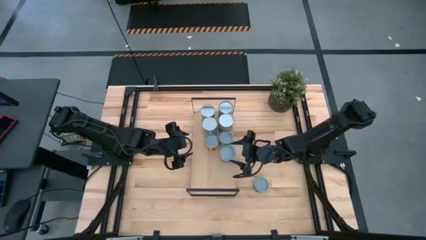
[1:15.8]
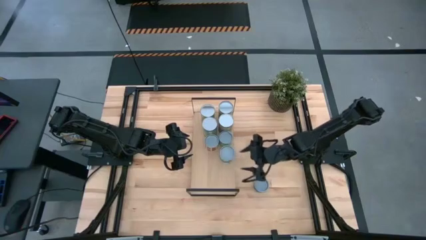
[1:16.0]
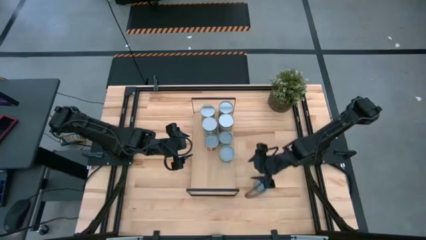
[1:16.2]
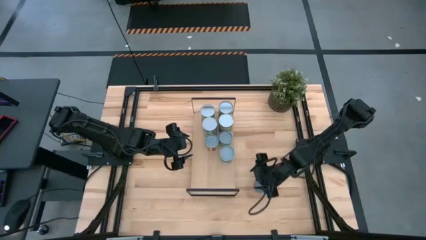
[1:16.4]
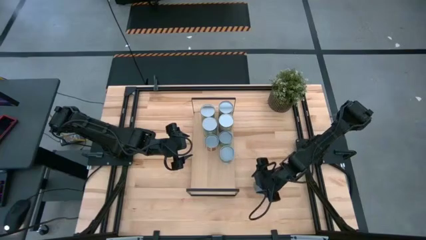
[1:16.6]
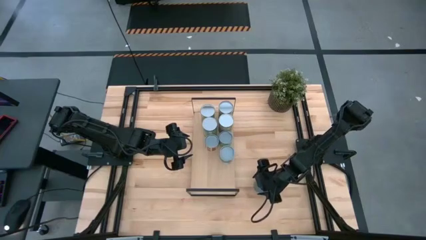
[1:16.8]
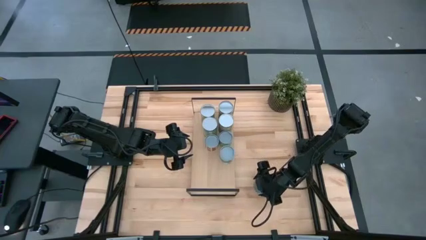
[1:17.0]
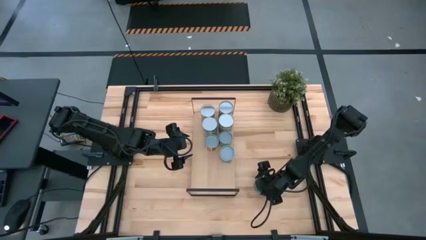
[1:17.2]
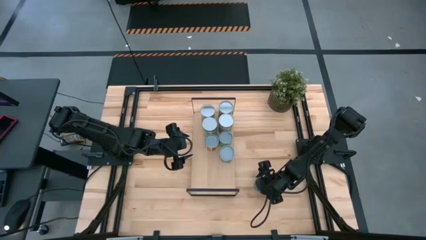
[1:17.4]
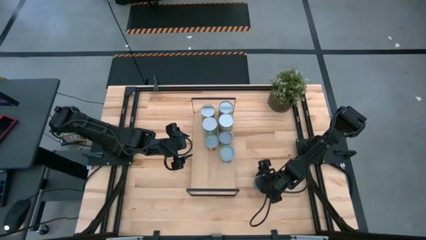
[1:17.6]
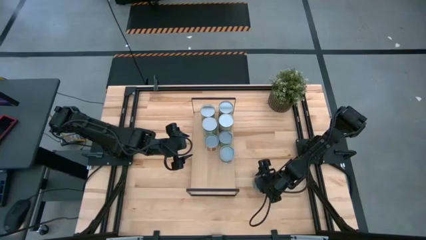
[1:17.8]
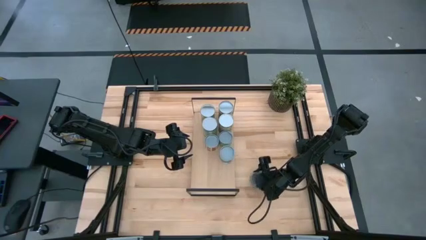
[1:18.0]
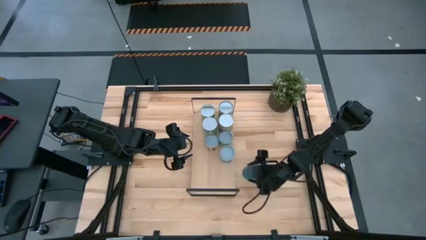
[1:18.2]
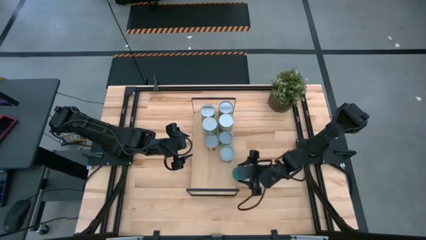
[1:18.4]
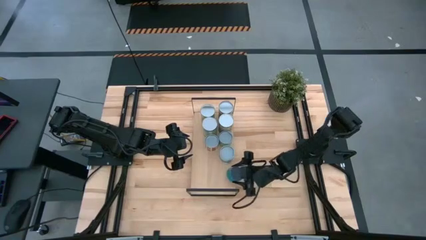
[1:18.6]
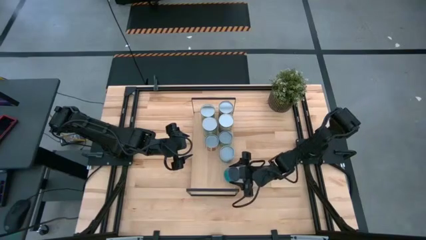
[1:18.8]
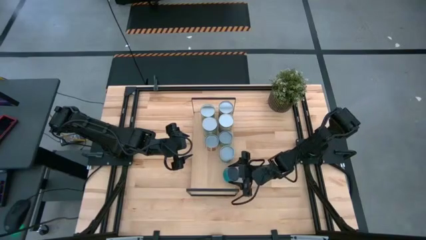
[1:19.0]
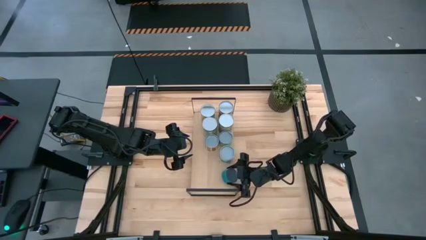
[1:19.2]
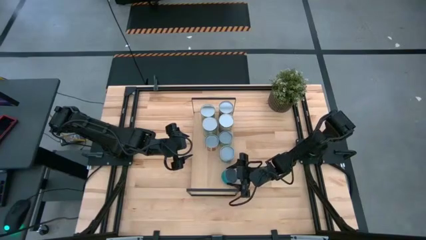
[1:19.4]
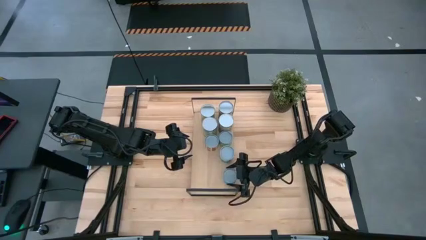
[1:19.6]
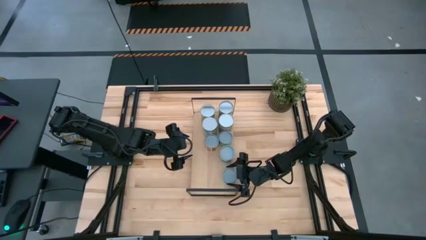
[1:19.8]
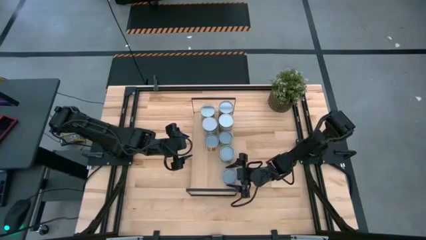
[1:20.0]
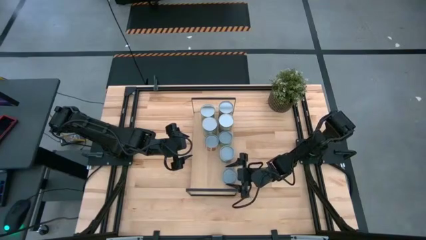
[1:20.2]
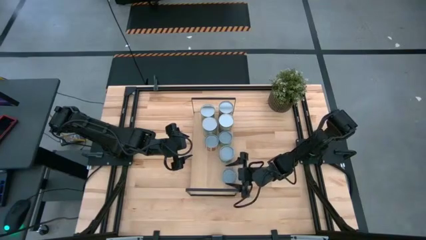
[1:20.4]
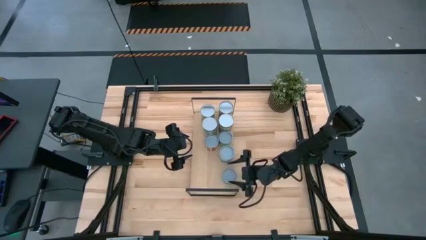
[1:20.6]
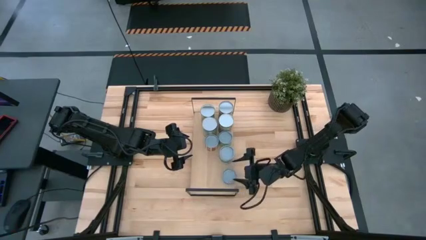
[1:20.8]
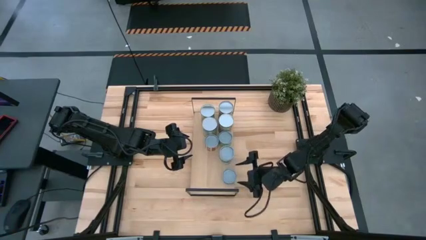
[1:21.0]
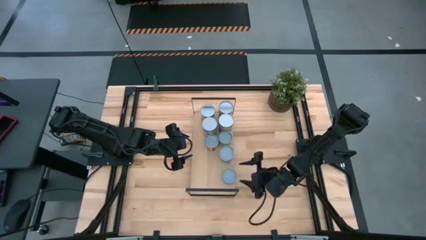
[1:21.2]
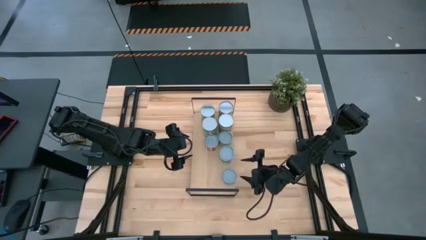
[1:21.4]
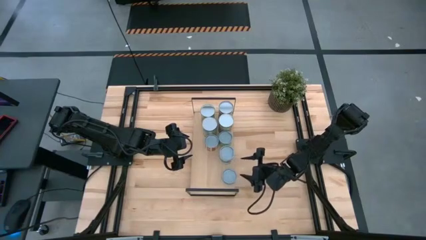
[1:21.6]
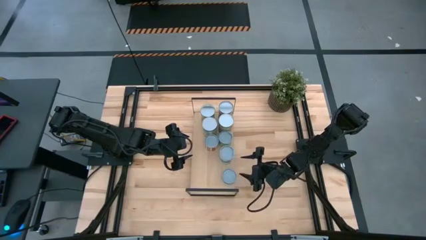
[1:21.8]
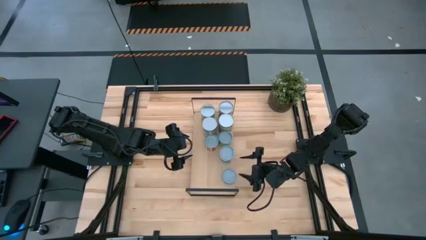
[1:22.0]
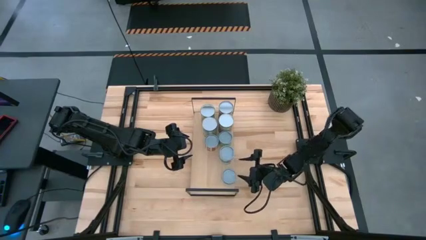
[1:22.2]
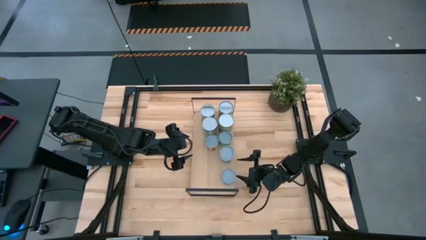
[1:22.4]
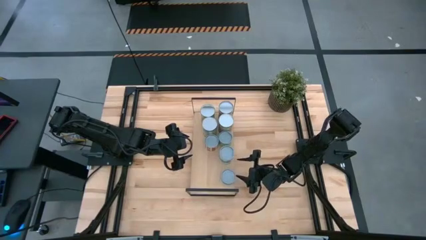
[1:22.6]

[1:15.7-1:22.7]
Task: Pick and place cans onto a shelf
Put the canned tuna on the shelf

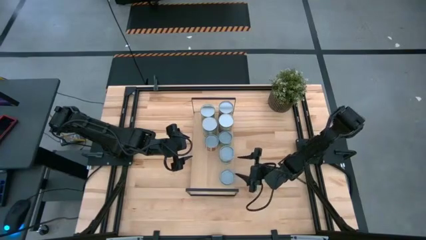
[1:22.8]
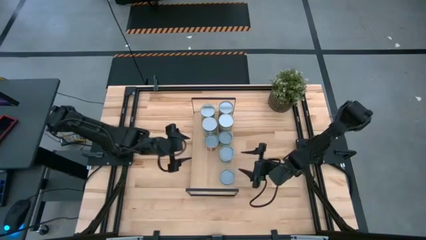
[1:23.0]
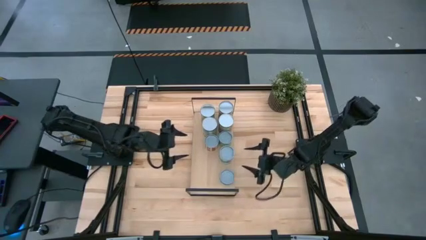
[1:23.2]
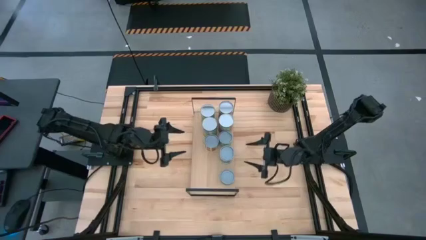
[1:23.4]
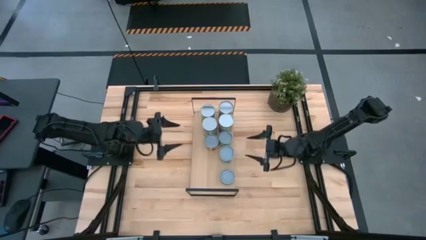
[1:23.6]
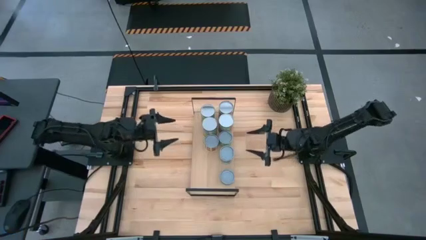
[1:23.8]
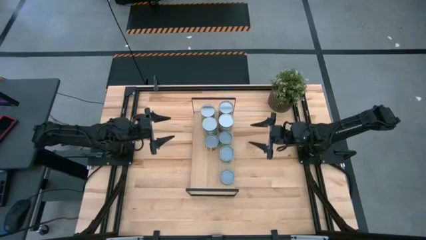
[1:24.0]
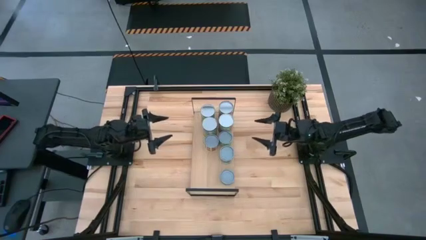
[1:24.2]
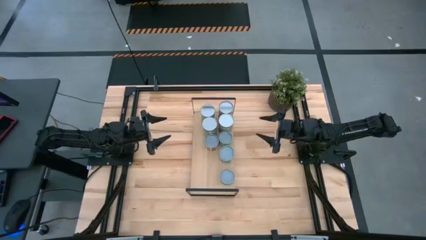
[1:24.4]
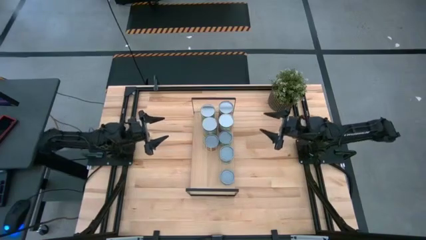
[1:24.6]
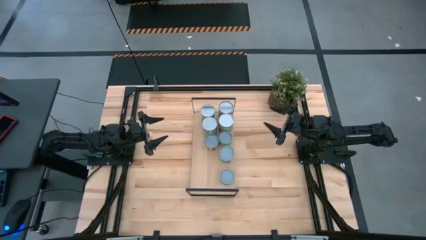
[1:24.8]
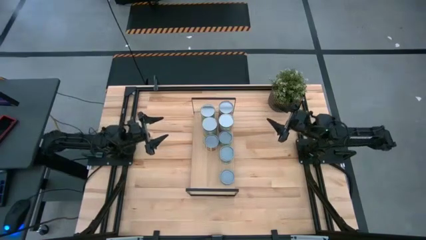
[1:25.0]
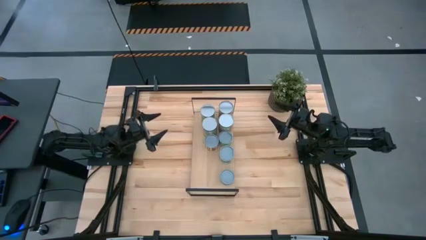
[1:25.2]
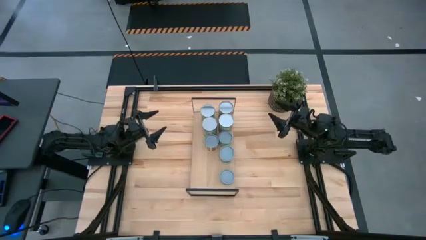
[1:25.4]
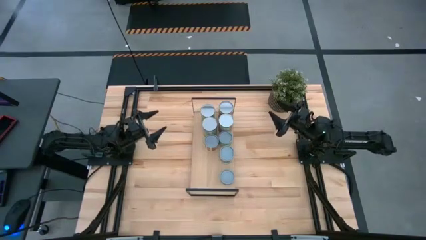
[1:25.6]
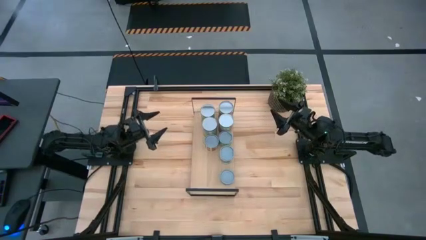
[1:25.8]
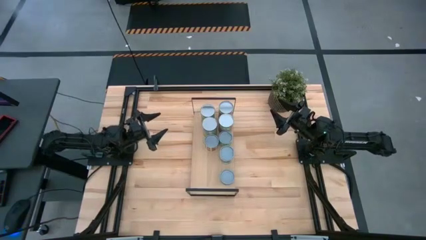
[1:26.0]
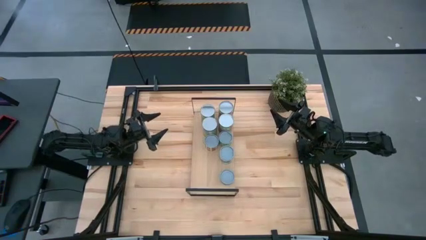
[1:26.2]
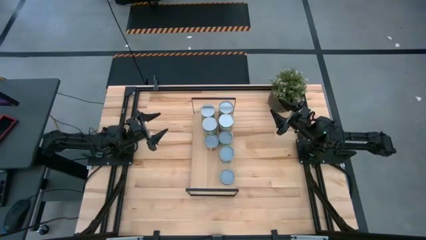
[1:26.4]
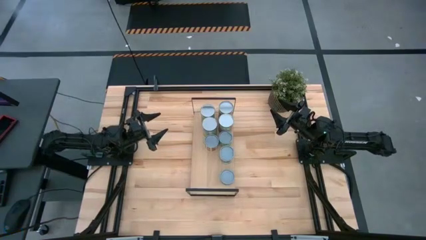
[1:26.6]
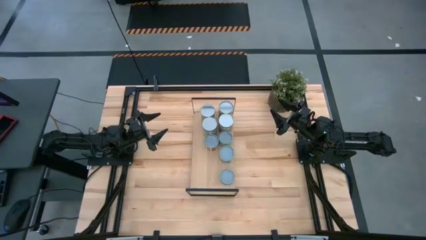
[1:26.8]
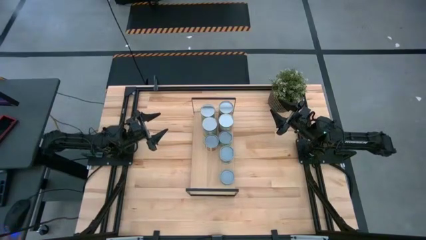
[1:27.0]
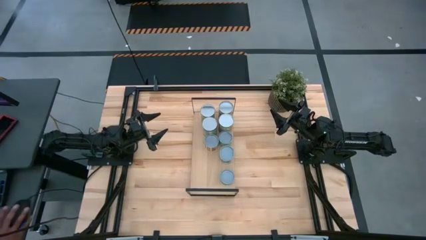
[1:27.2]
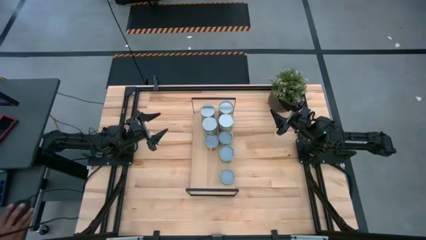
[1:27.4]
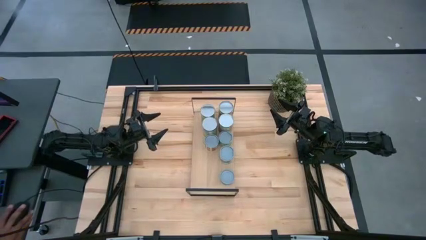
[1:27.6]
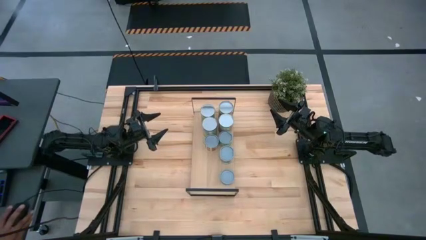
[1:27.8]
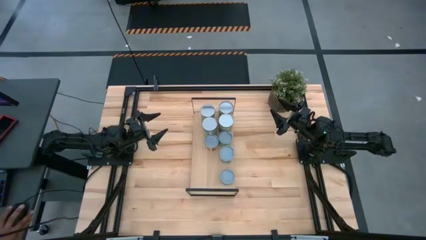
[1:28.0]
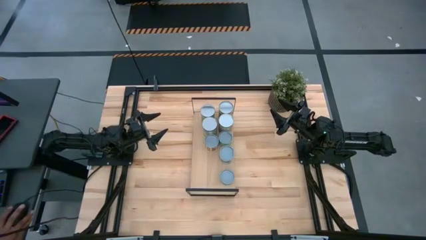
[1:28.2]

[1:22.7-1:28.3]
Return to Home Position
